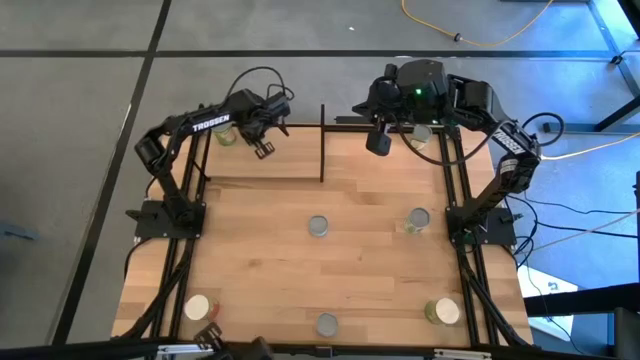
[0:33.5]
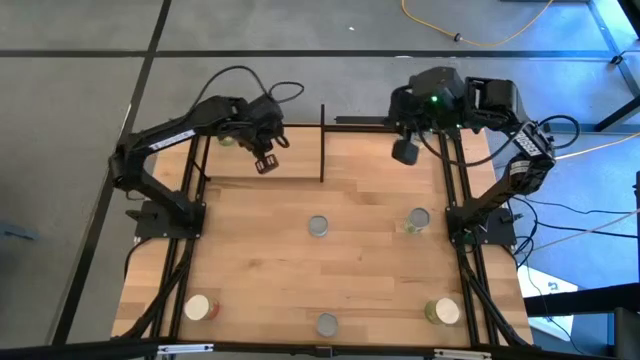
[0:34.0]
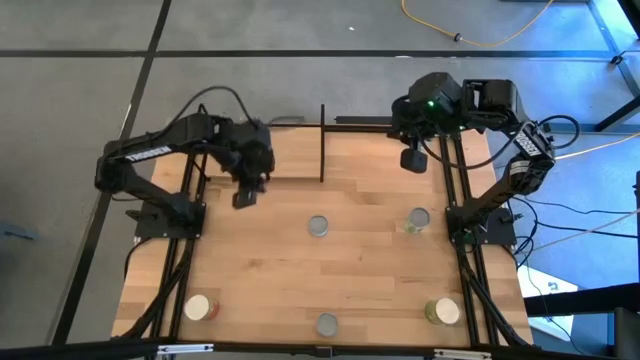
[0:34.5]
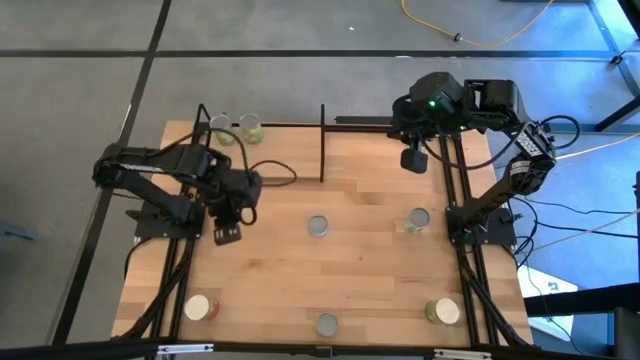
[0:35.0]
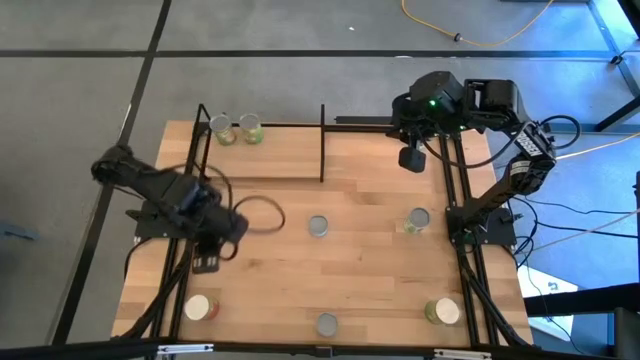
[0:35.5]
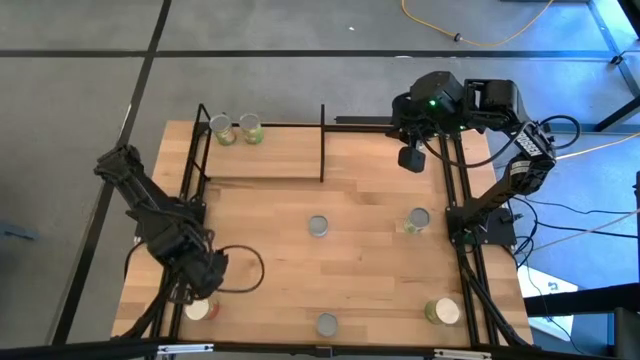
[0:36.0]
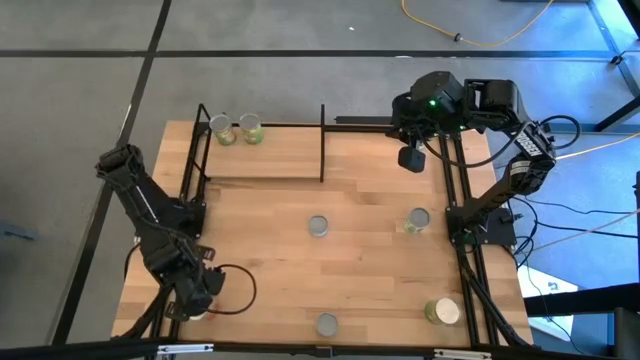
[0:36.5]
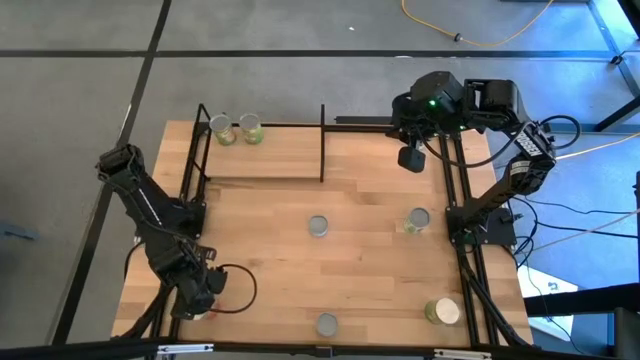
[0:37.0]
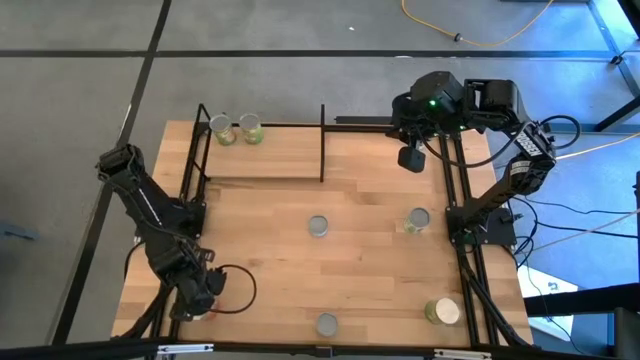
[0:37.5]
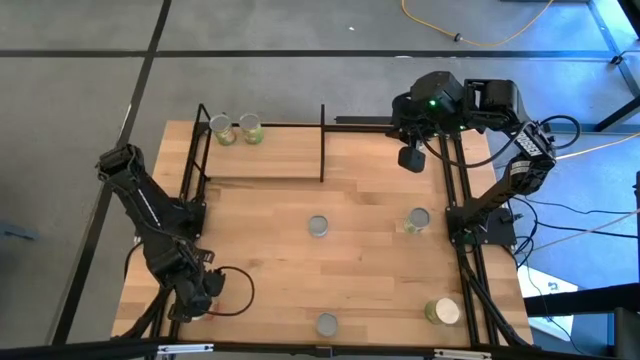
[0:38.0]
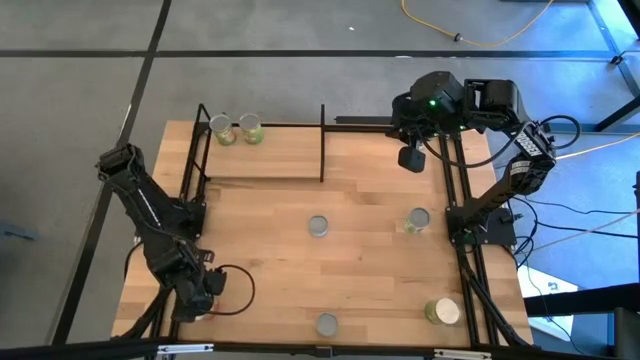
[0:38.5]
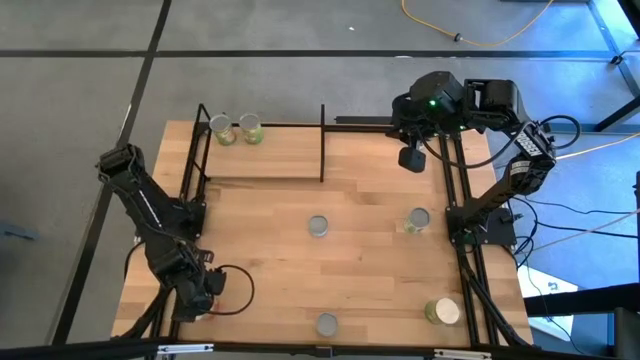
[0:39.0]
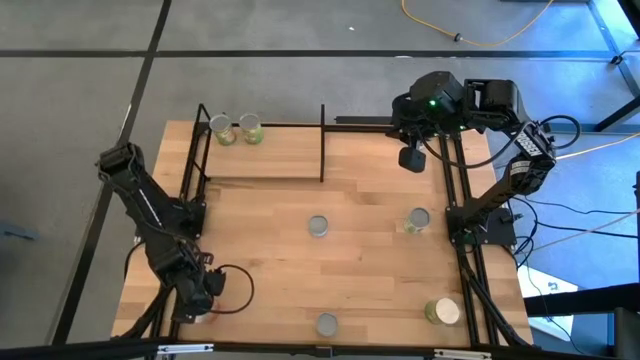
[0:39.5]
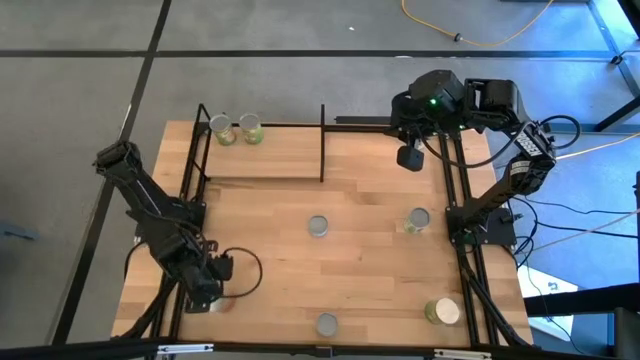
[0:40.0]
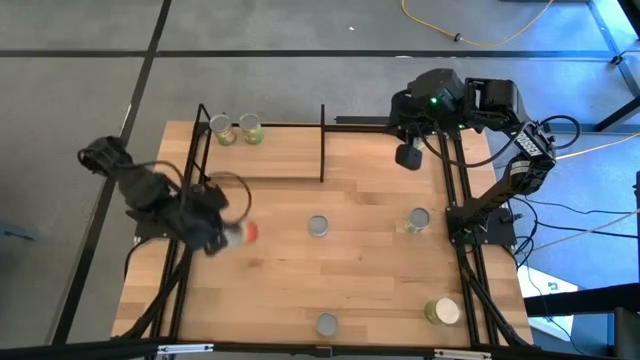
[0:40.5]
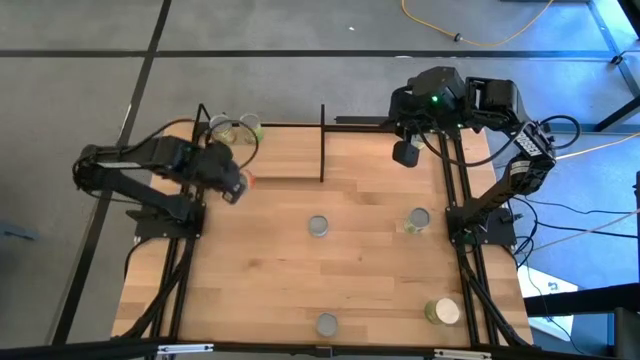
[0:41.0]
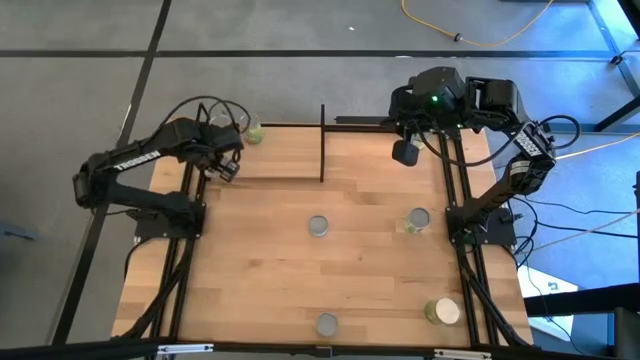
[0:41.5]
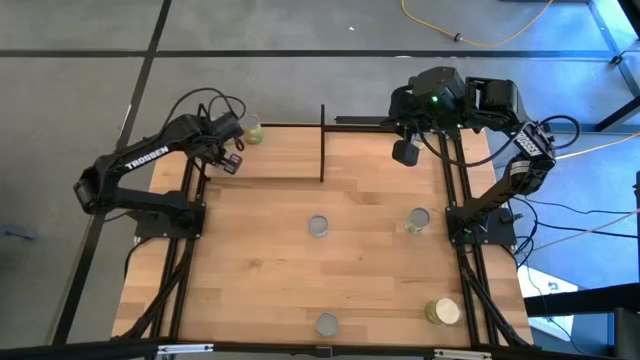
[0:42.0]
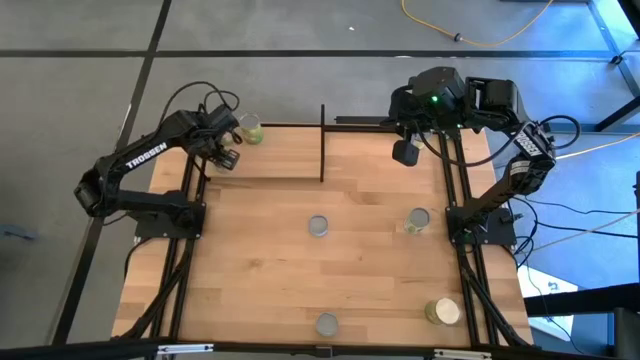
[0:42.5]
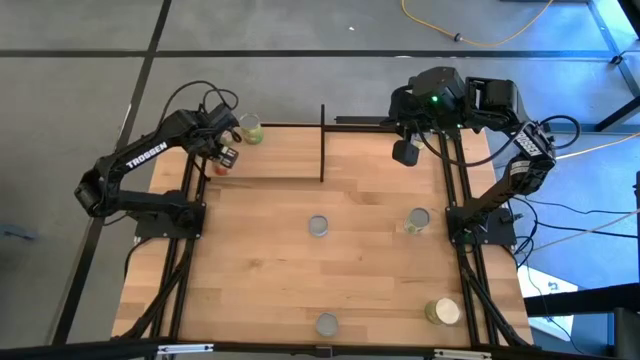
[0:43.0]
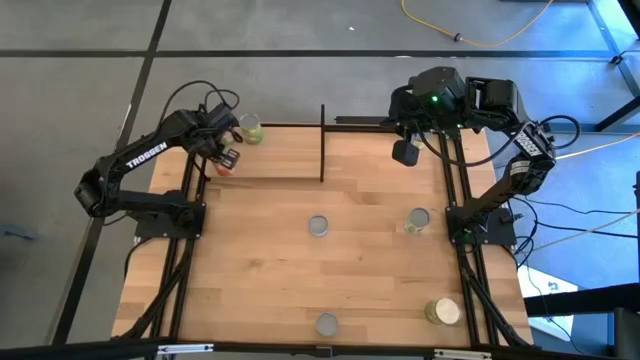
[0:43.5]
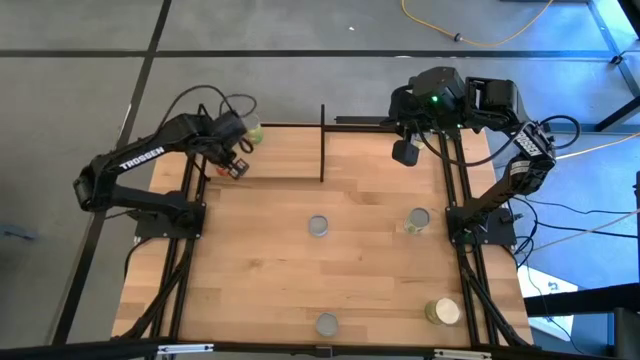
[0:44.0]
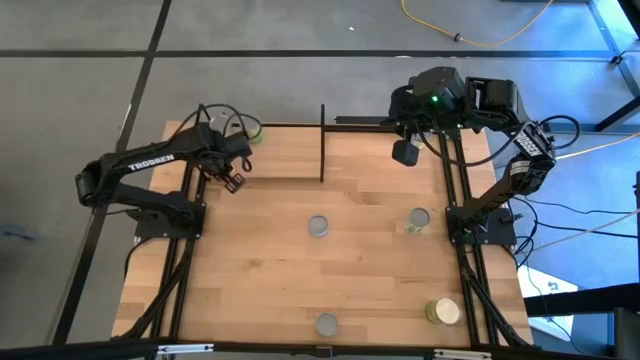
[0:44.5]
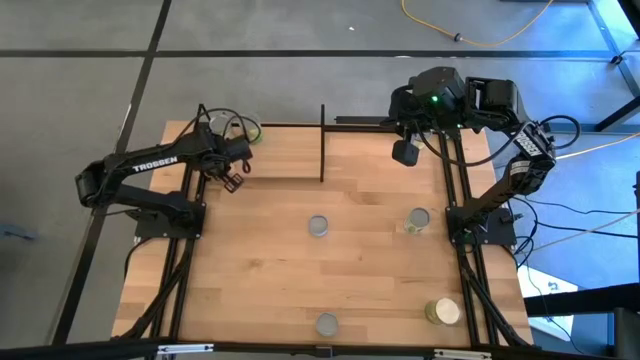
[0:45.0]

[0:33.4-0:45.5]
Task: Pick and place cans onto a shelf
Put the canned pineapples on the shelf

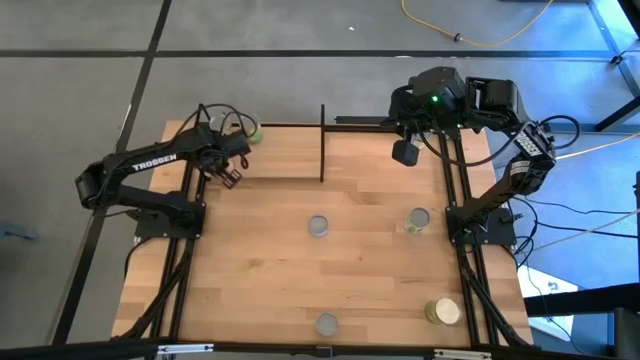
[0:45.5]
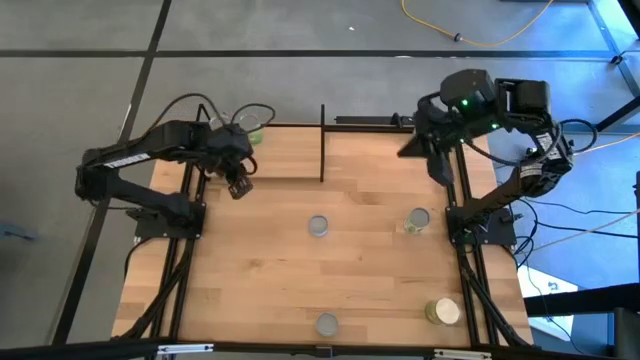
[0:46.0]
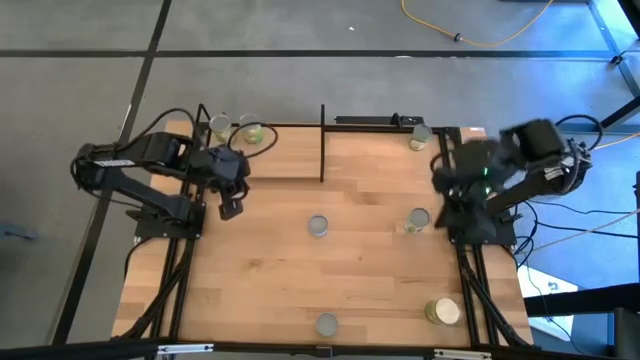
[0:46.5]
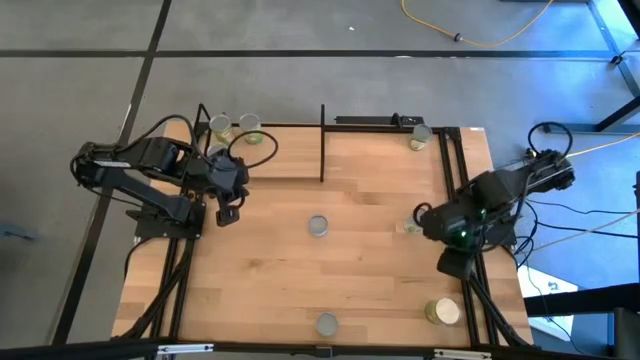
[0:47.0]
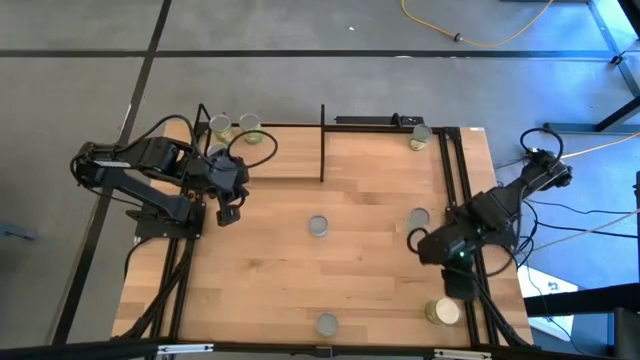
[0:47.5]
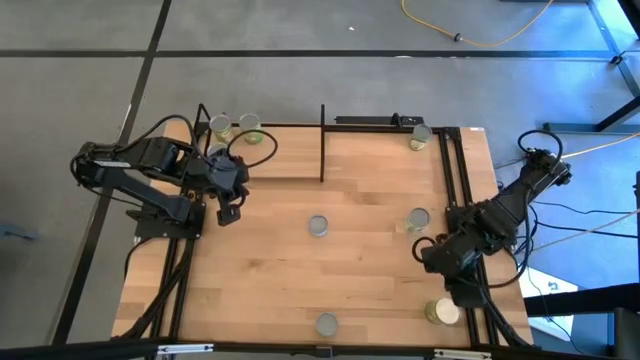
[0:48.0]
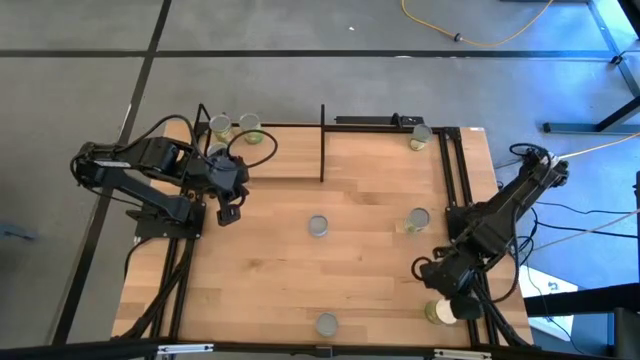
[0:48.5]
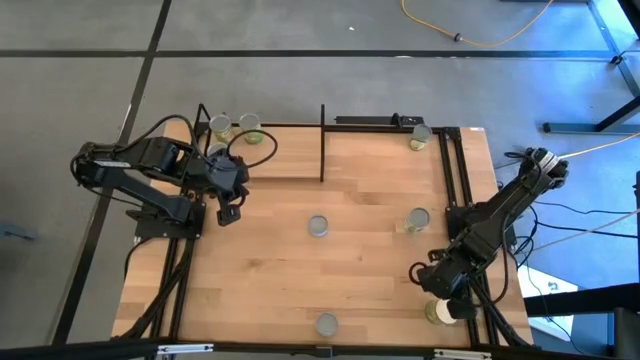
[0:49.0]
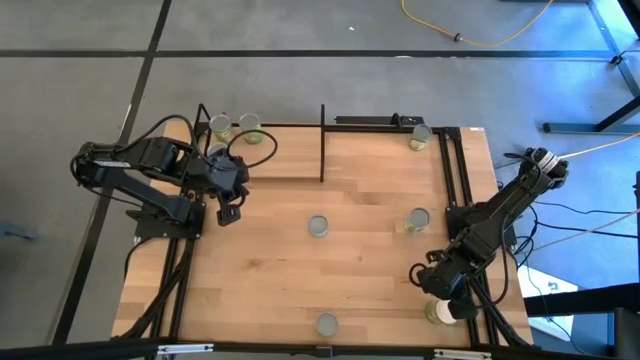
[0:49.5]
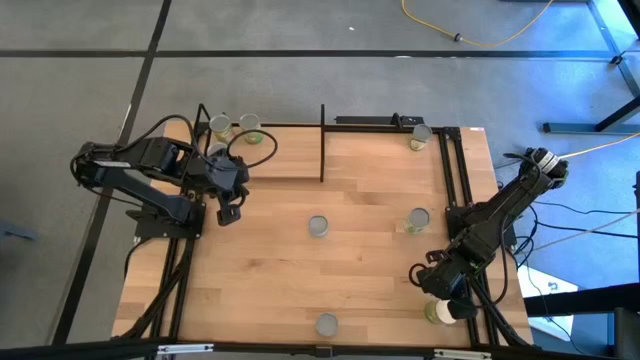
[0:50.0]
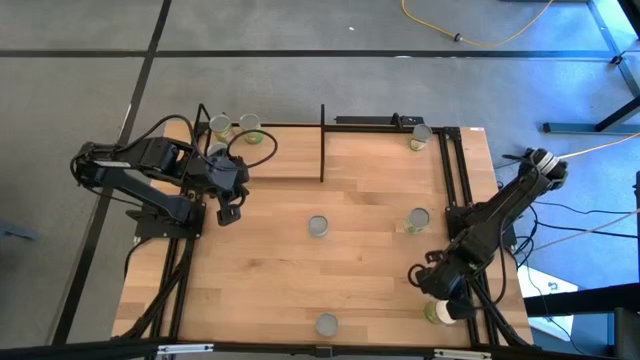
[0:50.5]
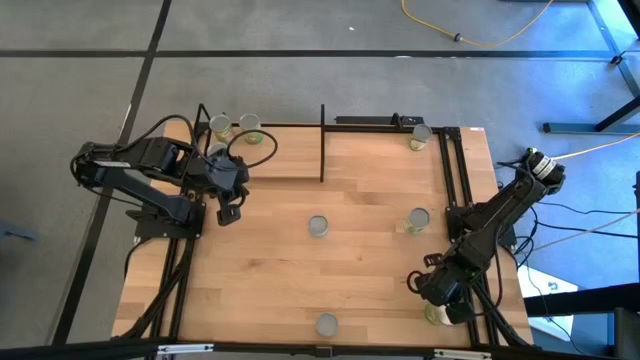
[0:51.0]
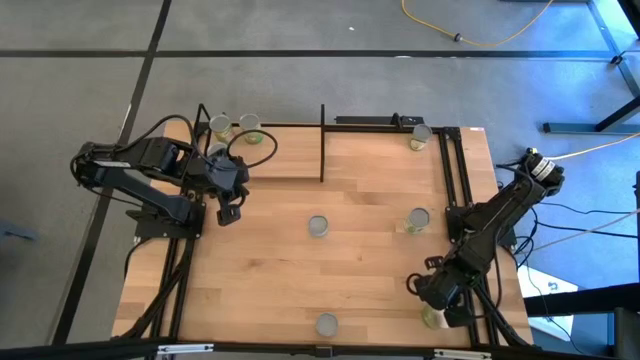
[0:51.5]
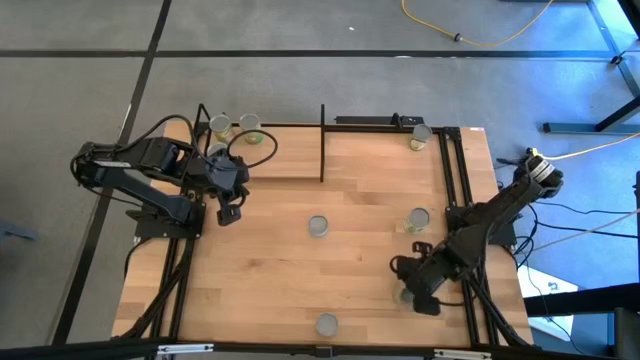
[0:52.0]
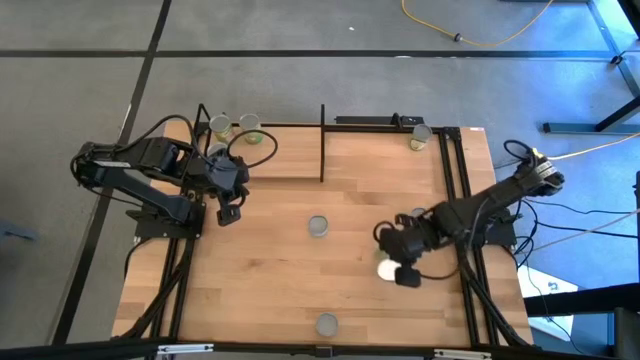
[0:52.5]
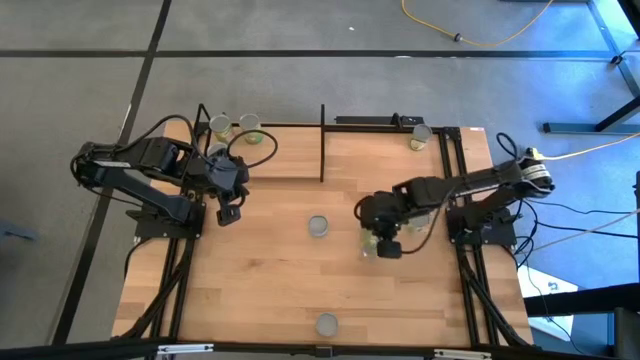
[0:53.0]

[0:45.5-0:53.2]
Put the canned pears can on the shelf
